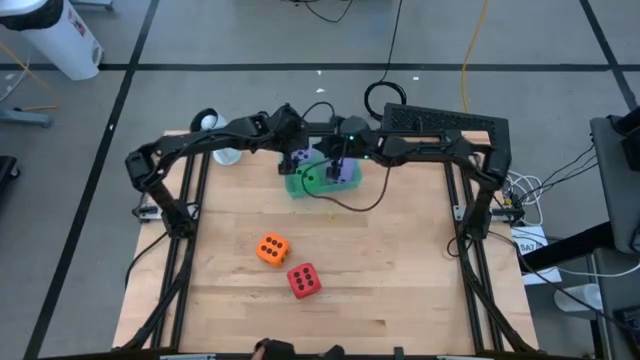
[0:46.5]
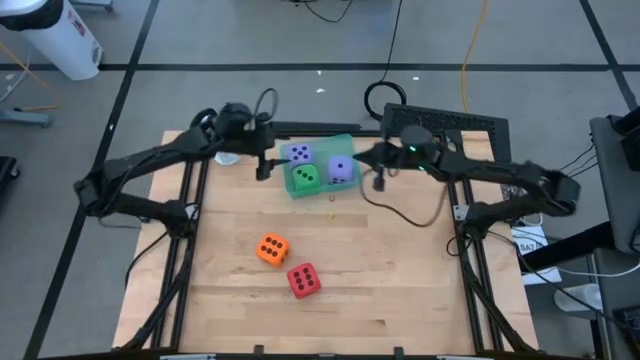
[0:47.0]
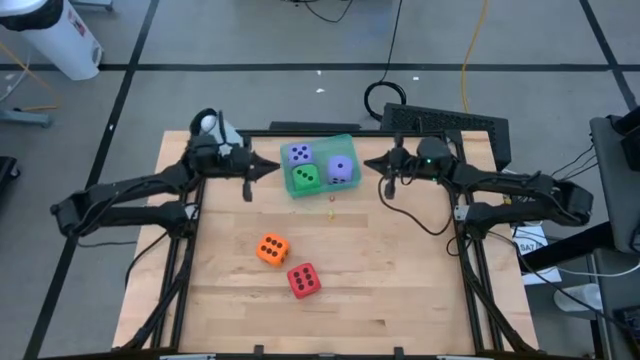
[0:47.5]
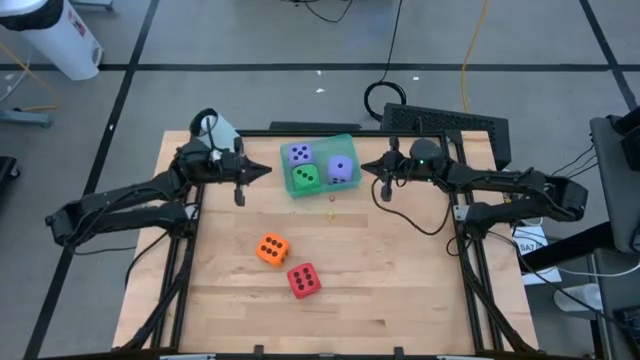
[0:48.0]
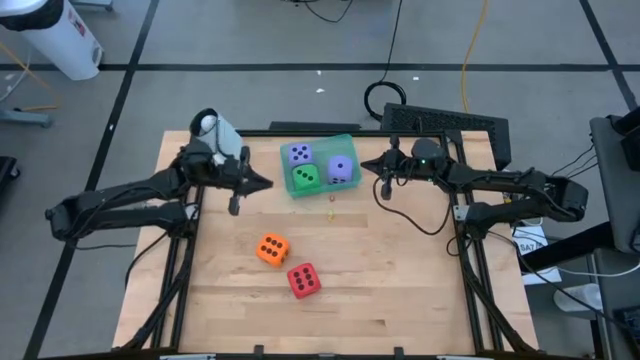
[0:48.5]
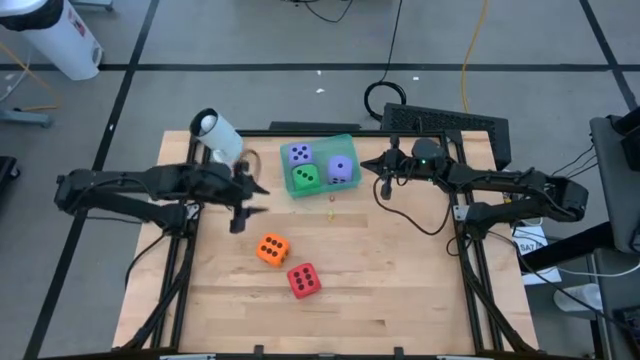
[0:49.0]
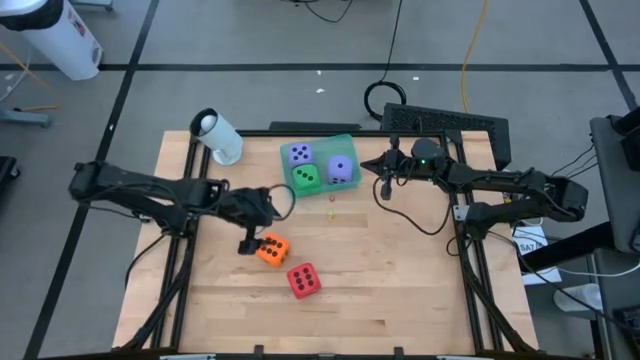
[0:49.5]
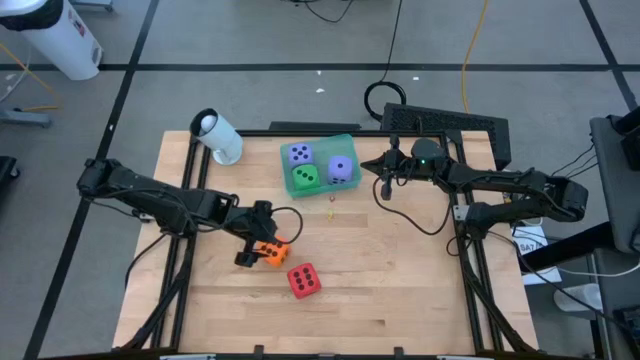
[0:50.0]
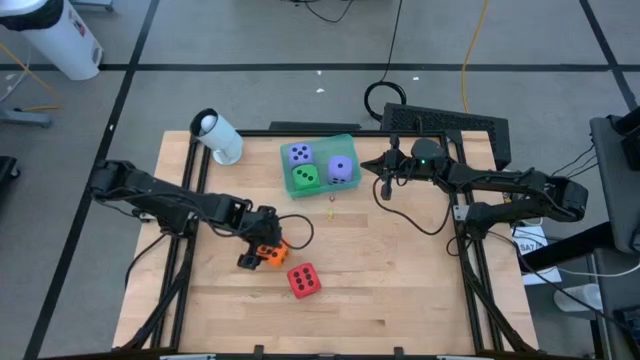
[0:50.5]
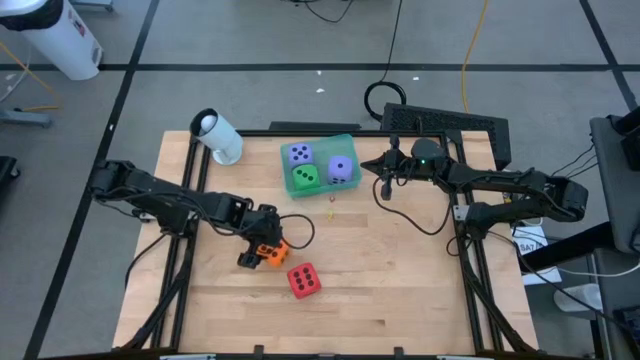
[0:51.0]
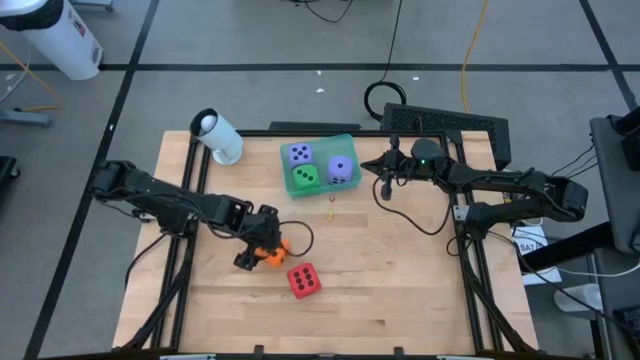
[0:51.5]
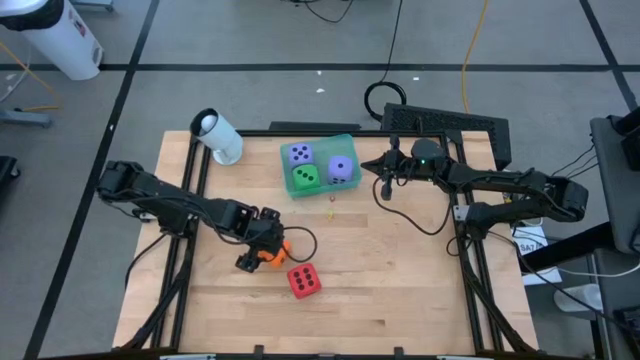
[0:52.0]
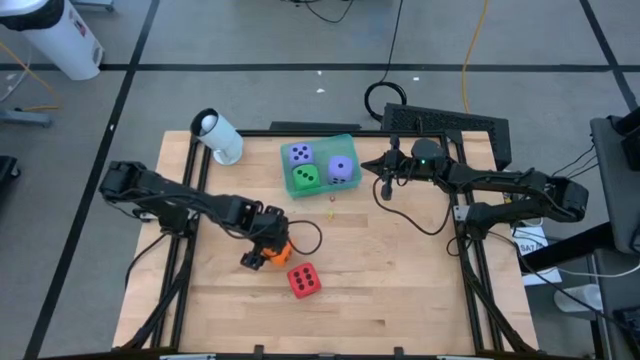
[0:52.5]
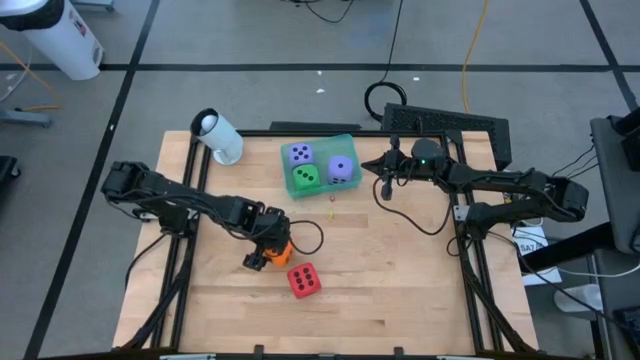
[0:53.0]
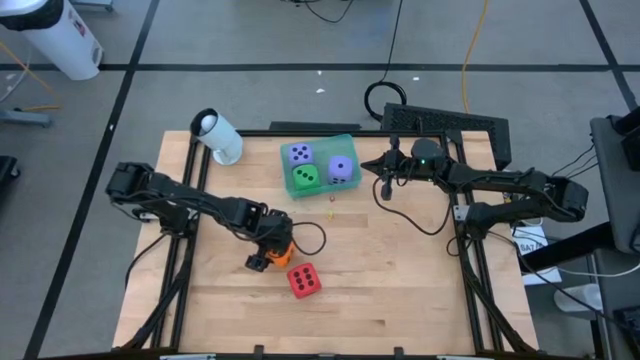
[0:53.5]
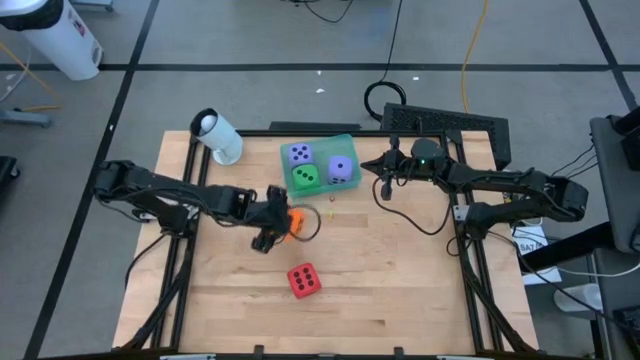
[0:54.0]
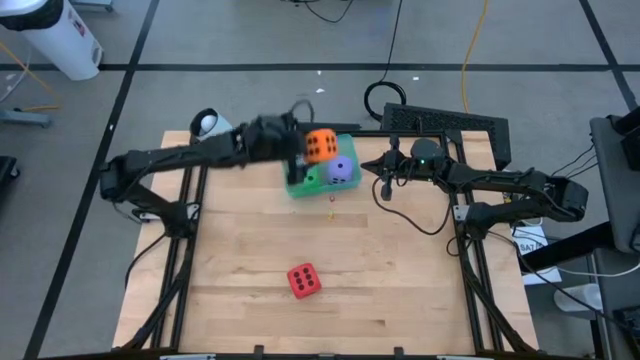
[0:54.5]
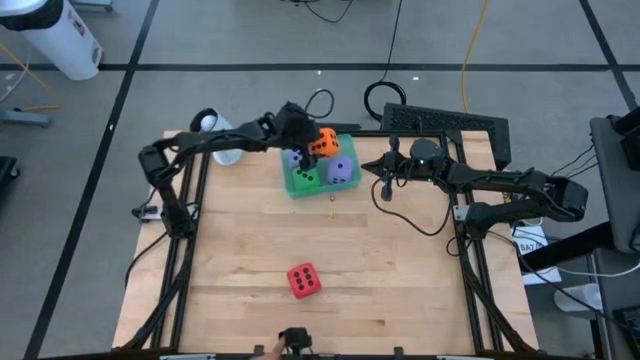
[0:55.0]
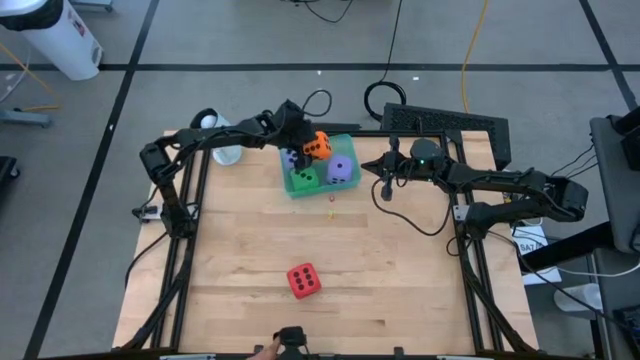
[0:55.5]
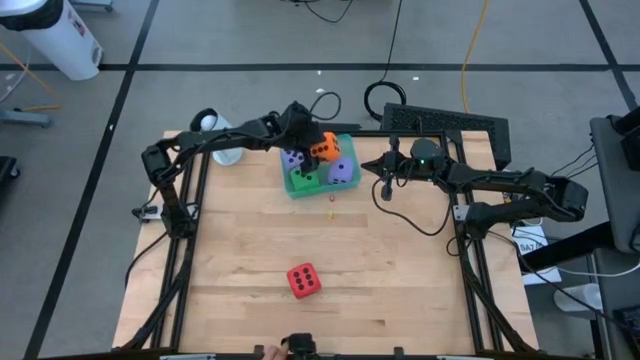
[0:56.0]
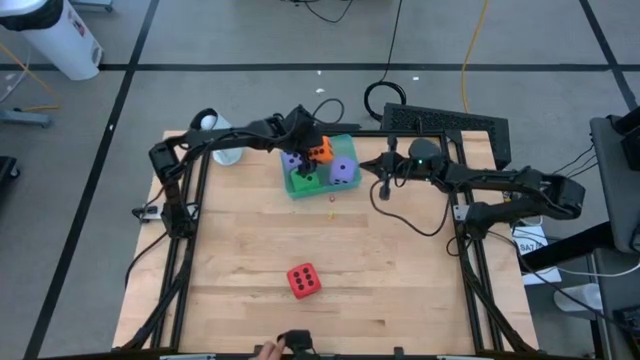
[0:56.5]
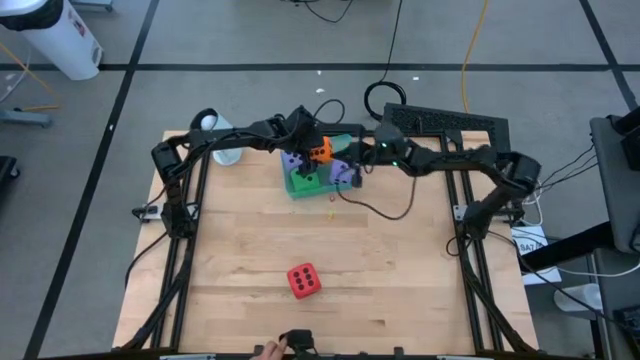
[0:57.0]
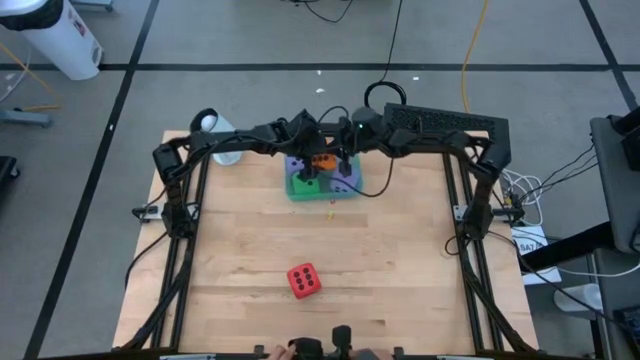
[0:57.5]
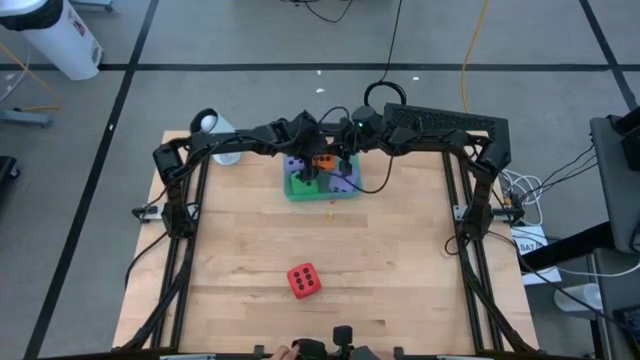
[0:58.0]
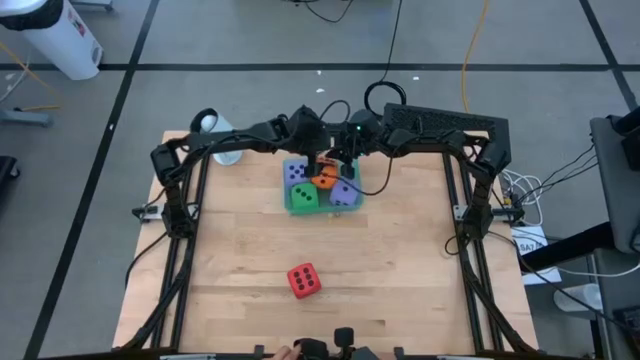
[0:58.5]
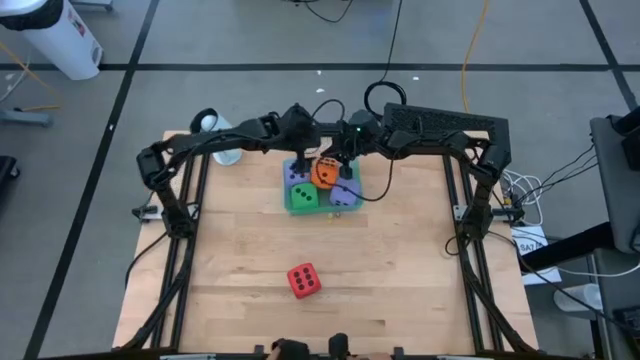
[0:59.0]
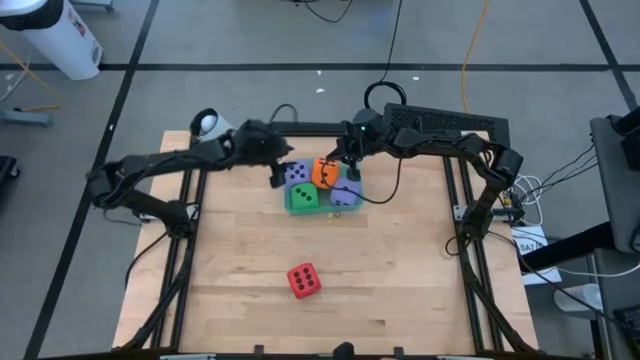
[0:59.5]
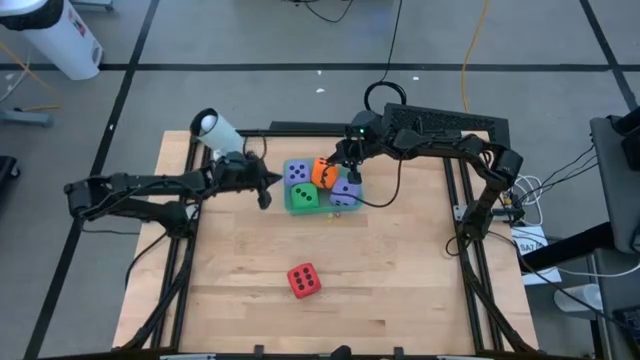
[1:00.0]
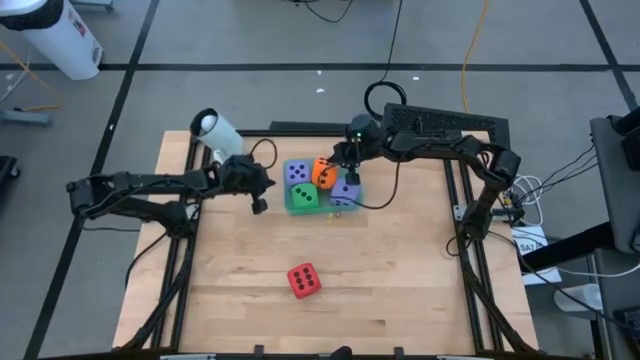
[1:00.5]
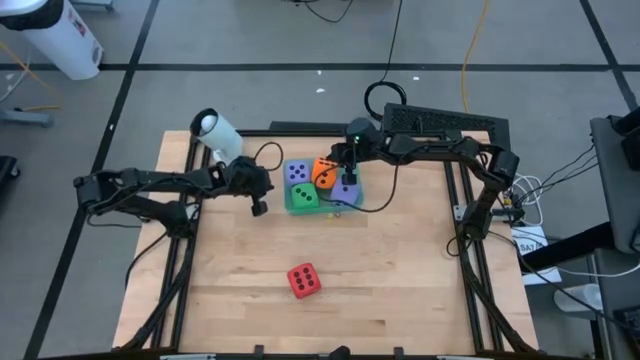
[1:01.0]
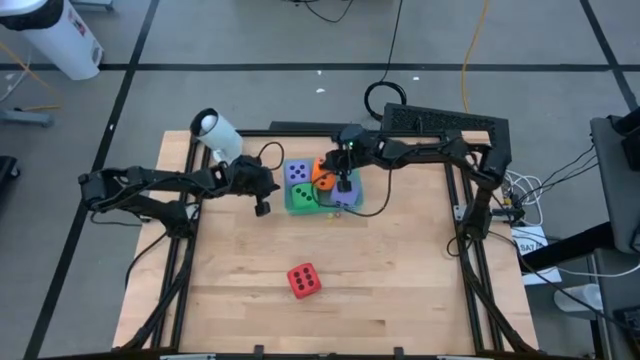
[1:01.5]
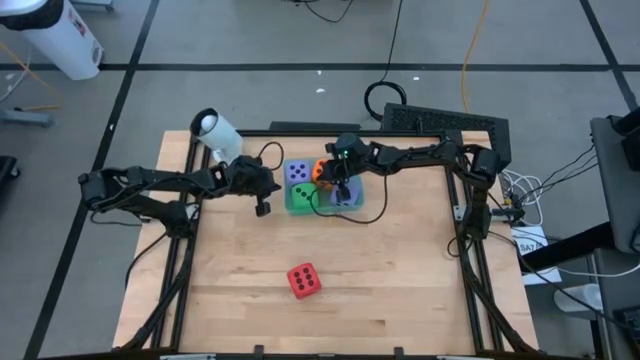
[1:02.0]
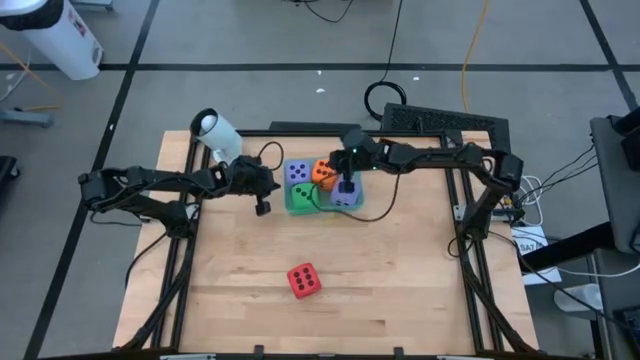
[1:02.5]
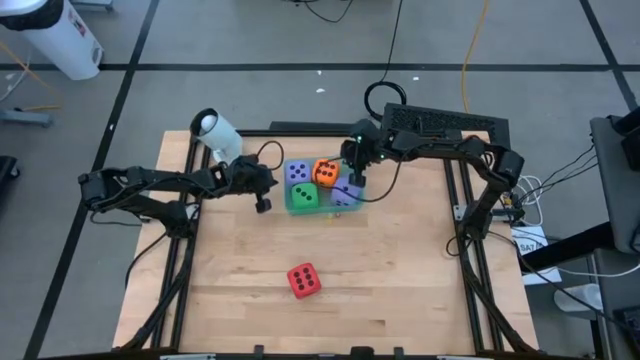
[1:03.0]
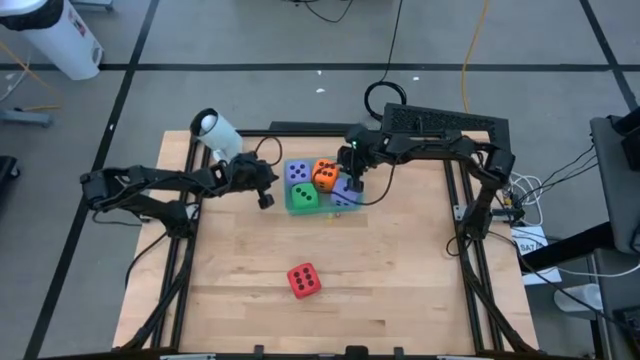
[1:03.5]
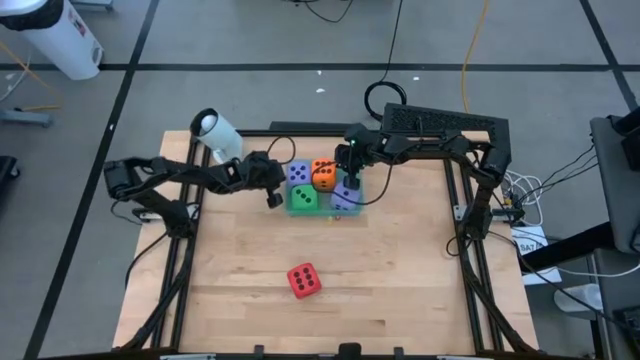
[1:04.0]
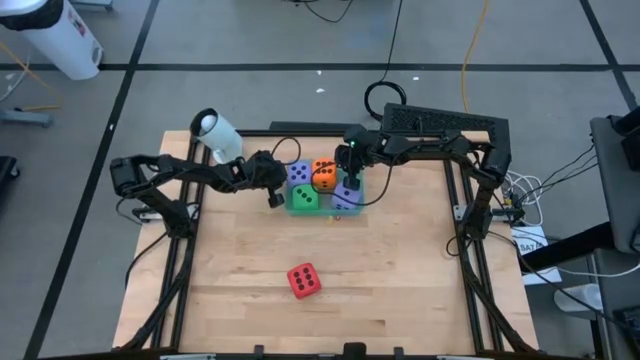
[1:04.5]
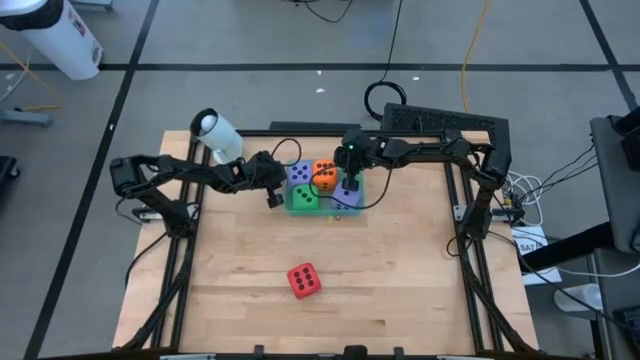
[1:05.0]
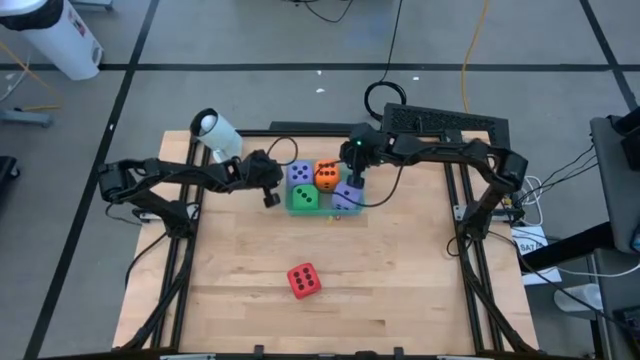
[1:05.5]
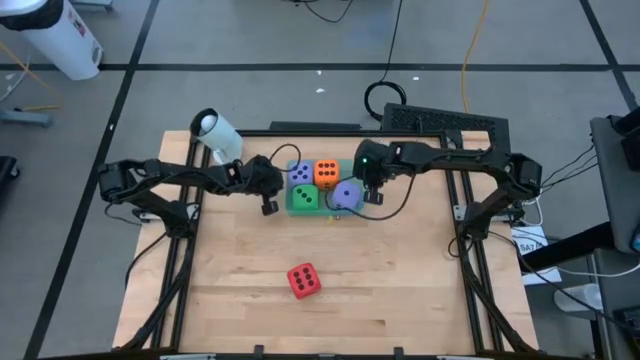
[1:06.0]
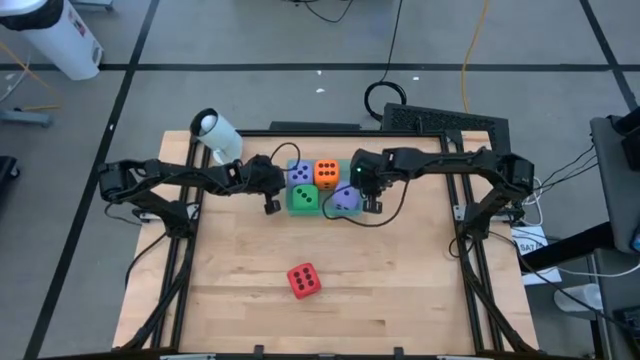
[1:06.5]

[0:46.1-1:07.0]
Task: Pick & Place Dice
Put the large orange dice into the blue bin

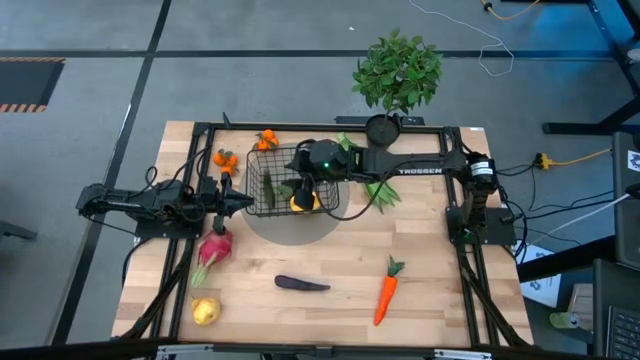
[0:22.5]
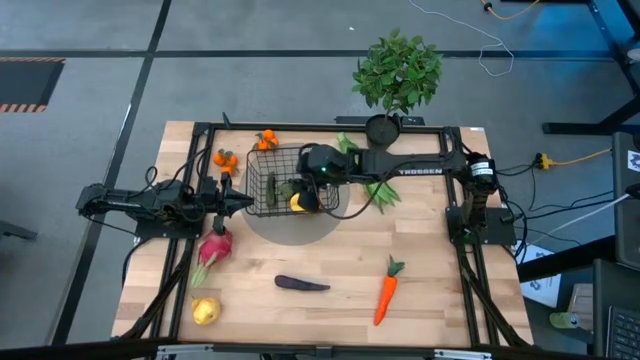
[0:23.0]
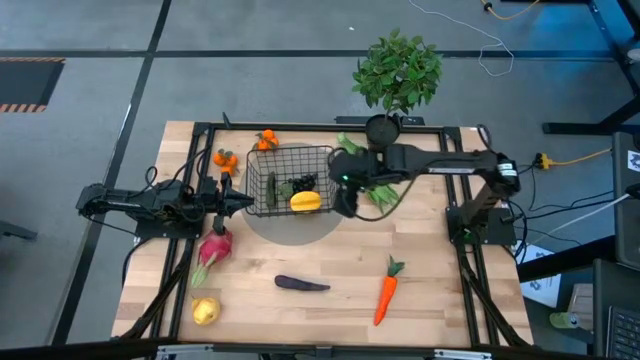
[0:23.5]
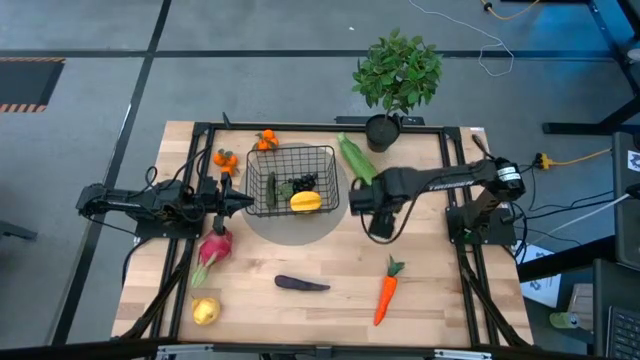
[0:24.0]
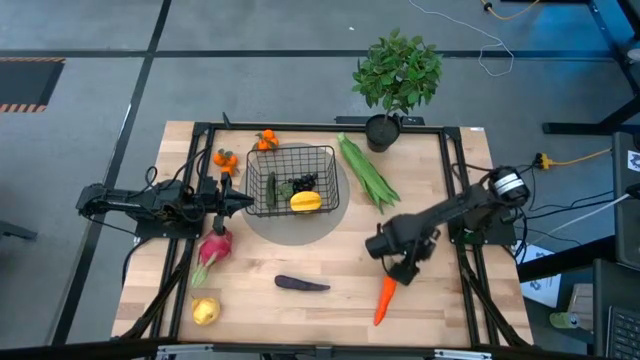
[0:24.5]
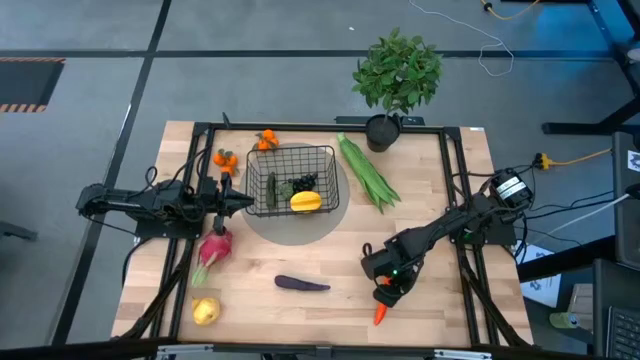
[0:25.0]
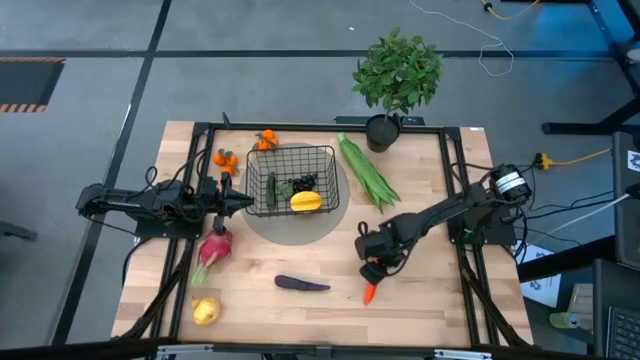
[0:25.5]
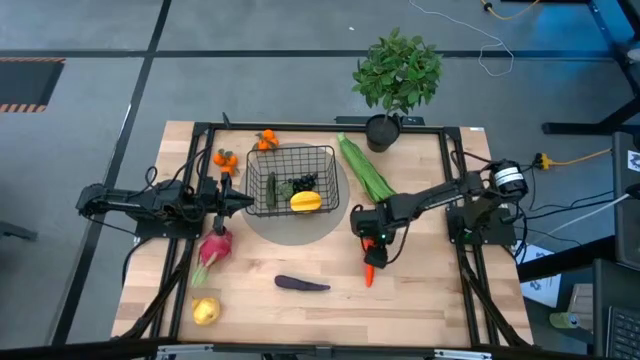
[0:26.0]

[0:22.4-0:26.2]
Task: Build produce basket
Put the orange carrot into the black wire basket
